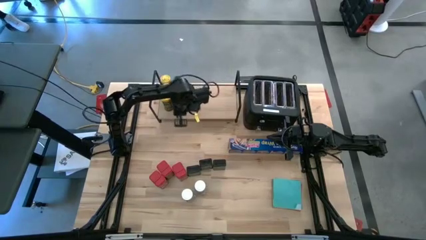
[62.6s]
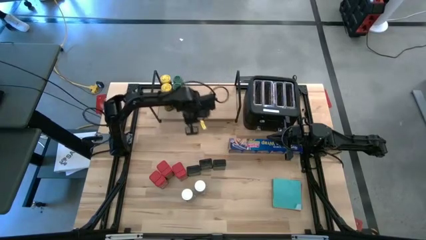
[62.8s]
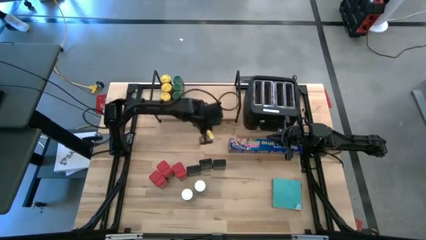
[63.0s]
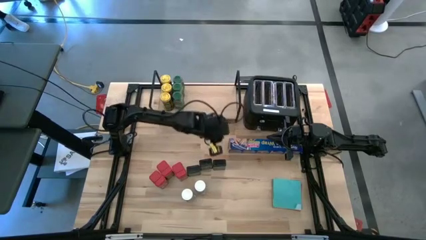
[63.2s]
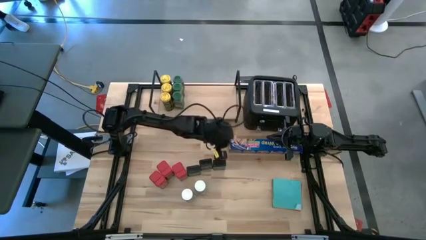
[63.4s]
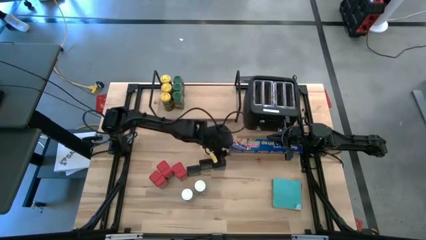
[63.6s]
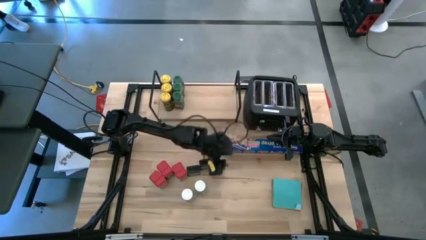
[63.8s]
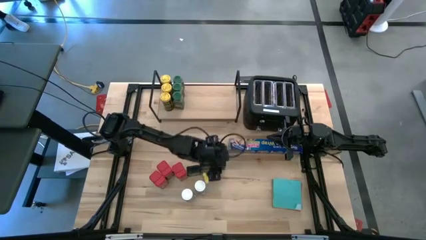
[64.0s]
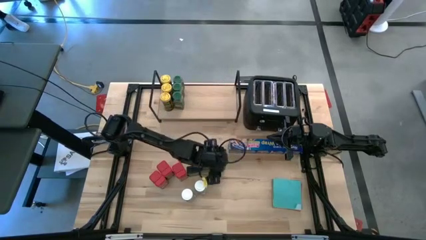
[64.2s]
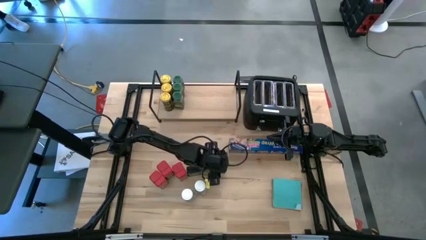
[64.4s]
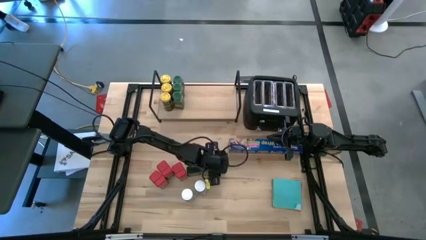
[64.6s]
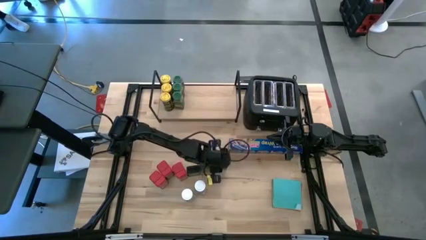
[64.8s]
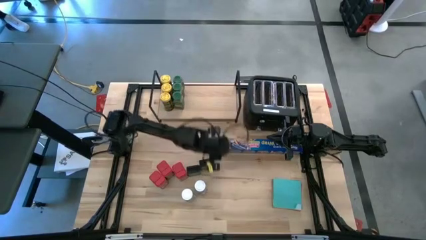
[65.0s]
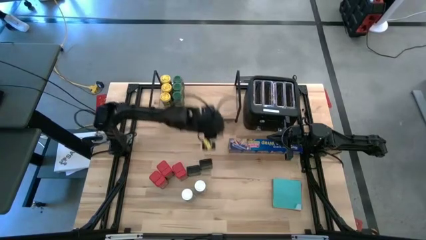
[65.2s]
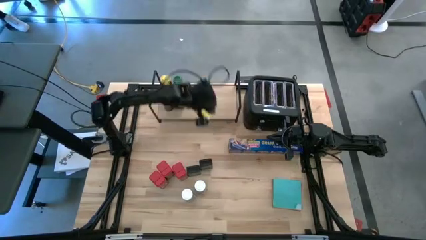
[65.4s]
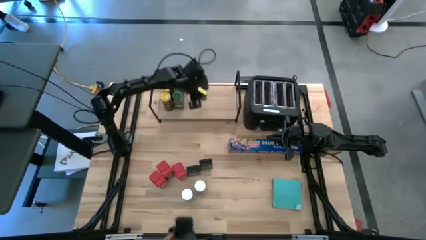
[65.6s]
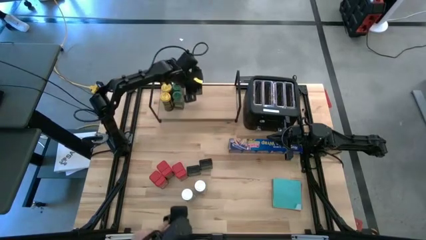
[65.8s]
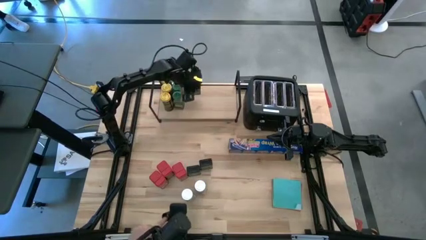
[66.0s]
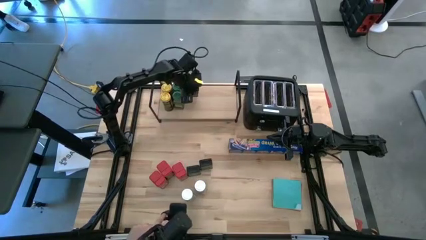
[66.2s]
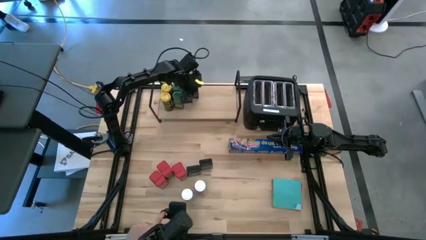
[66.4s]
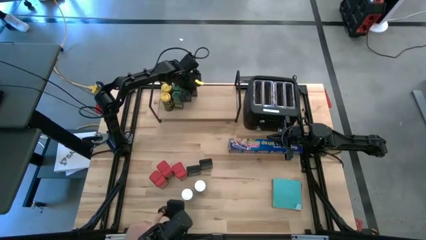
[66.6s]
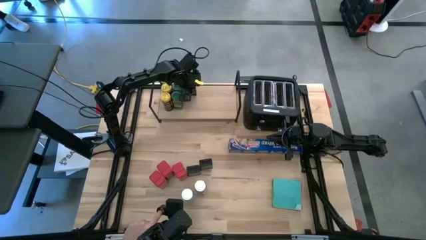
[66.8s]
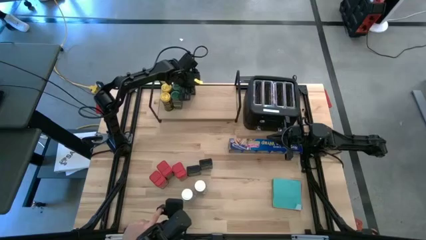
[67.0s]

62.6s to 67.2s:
Task: Shelf spices
Put the right green seasoning can on the shelf

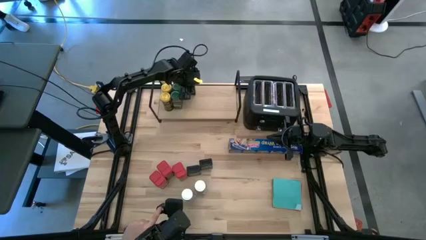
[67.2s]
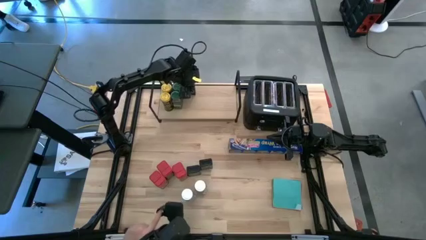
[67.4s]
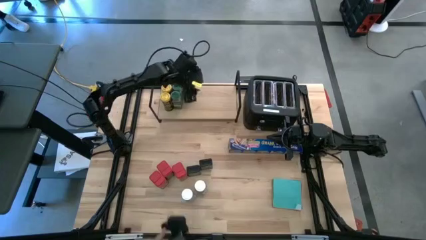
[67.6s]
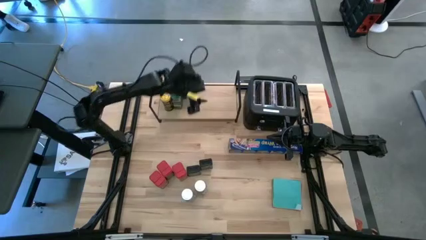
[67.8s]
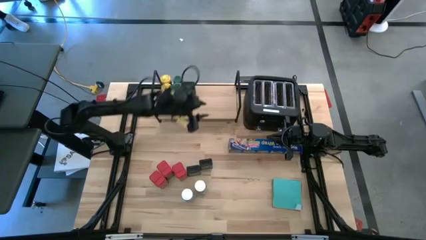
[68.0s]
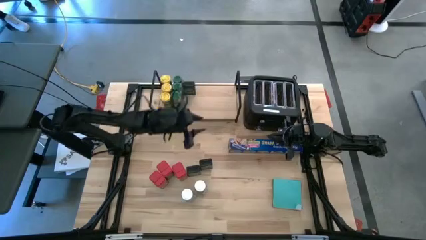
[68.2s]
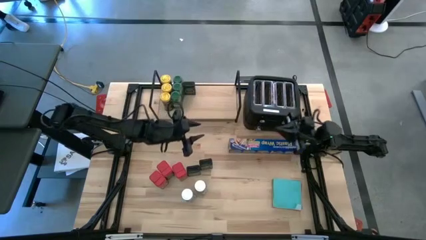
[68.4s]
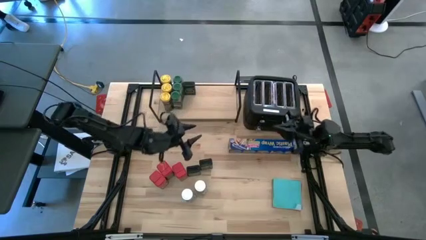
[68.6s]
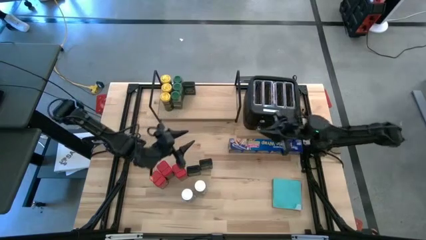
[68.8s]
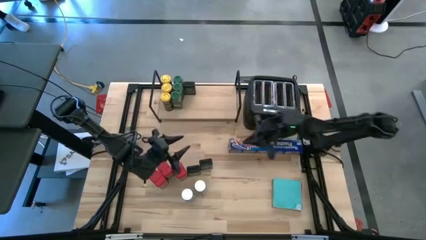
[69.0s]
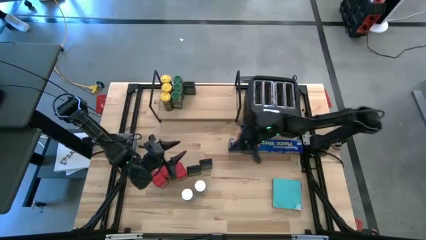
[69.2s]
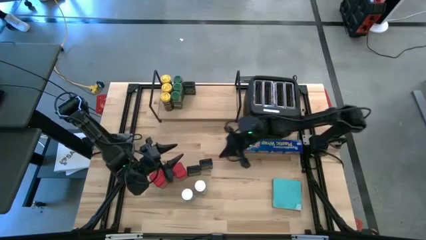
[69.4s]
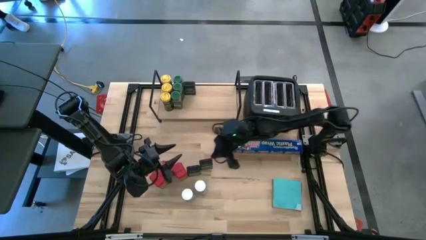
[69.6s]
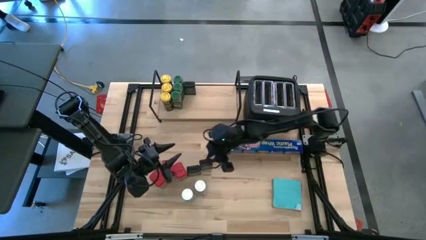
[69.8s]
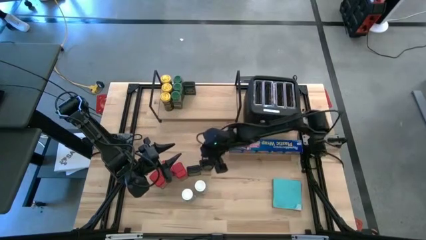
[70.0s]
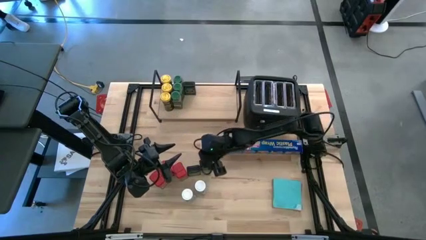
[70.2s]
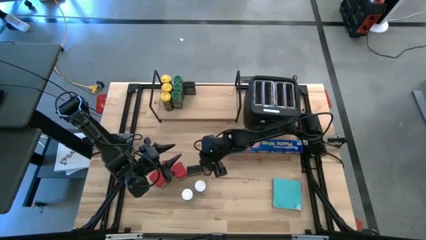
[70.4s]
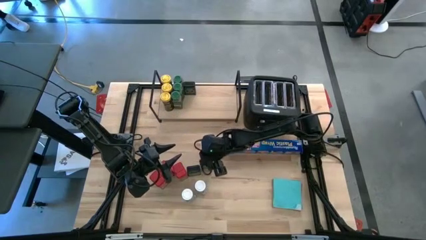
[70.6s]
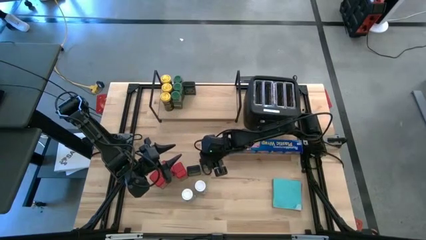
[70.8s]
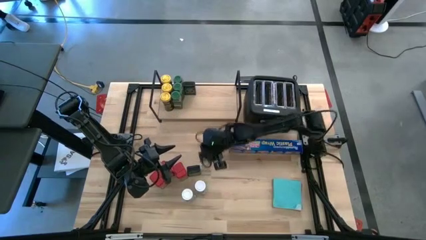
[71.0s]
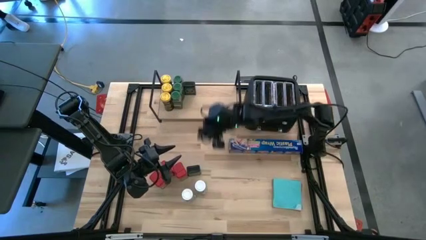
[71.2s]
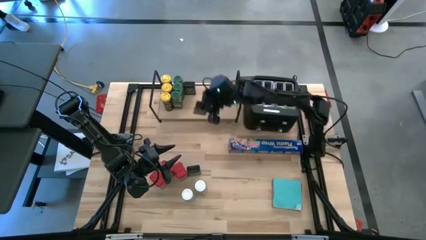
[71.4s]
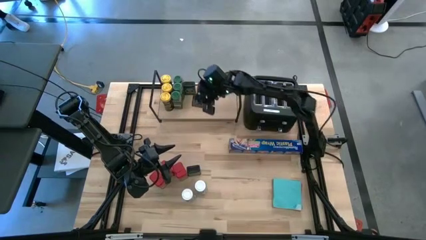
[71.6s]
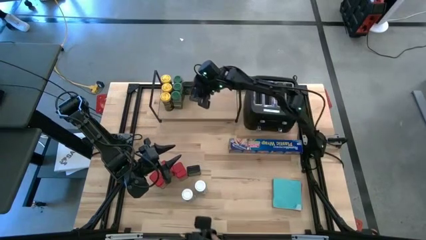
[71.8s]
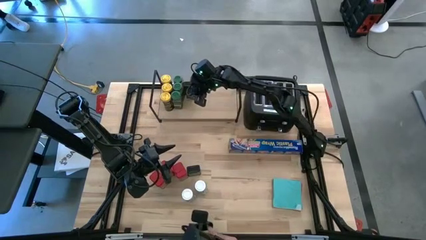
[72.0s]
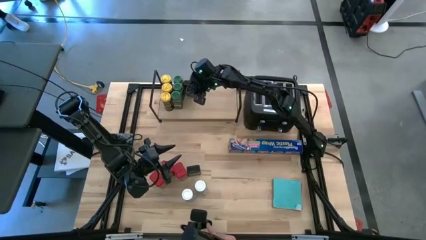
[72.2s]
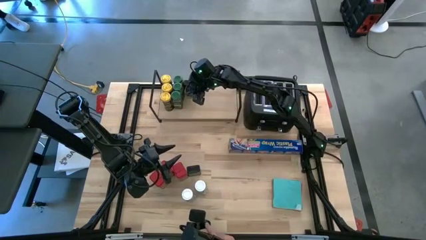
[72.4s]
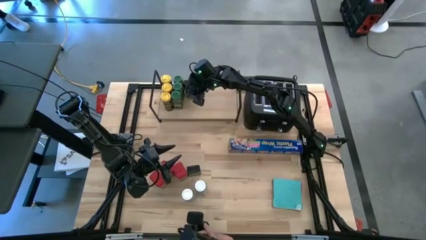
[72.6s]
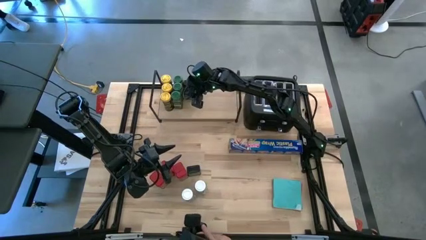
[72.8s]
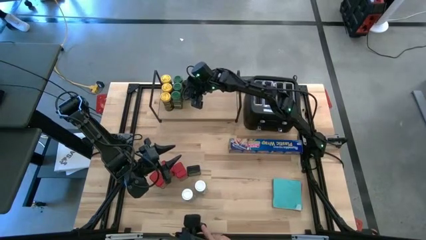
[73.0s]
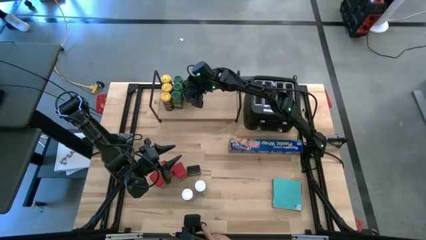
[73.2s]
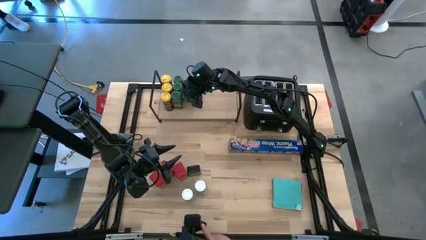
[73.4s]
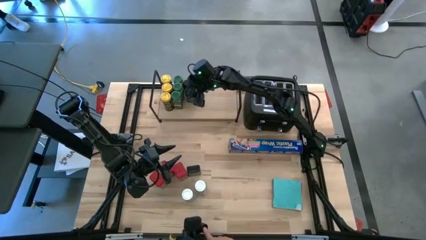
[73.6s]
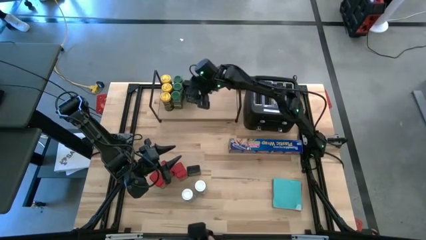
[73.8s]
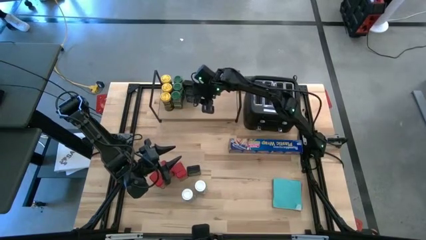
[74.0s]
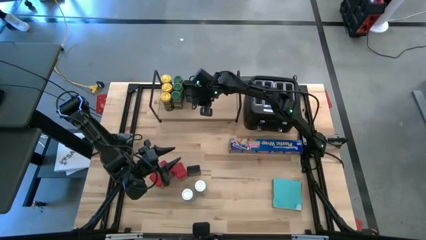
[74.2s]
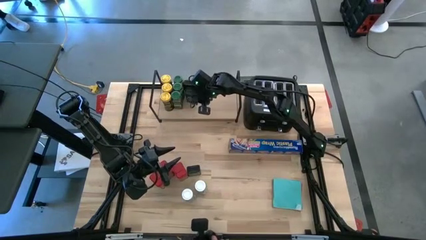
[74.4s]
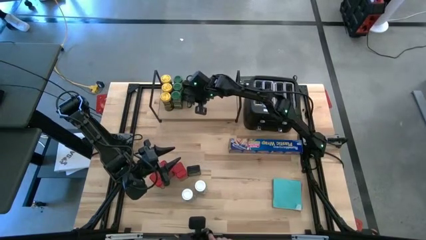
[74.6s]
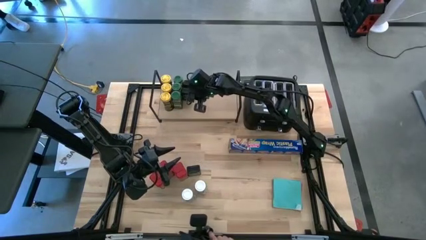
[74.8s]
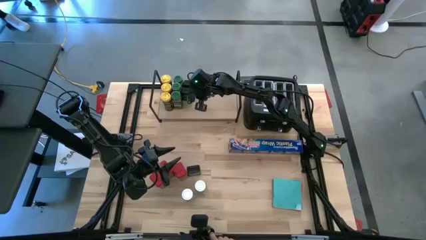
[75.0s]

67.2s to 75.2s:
Put the right green seasoning can on the shelf aligned with the other green seasoning can

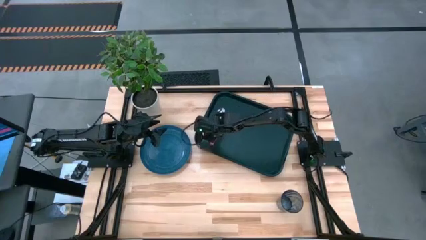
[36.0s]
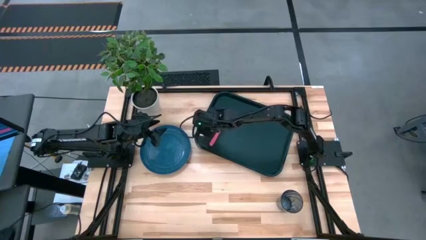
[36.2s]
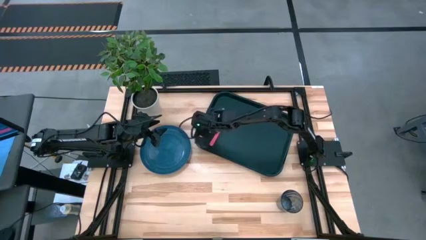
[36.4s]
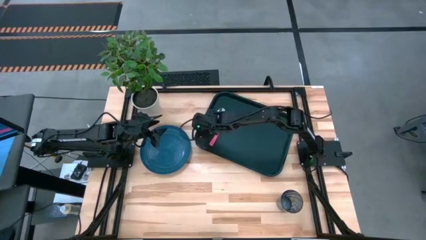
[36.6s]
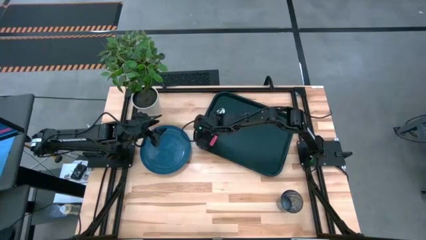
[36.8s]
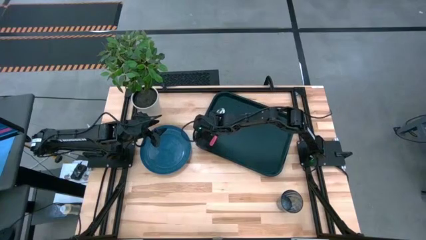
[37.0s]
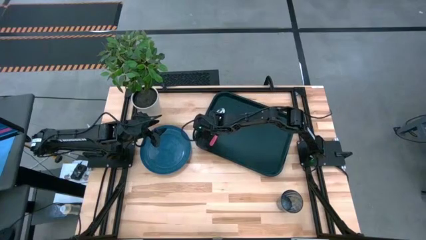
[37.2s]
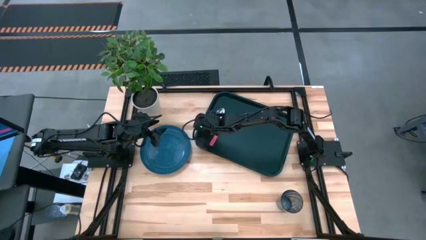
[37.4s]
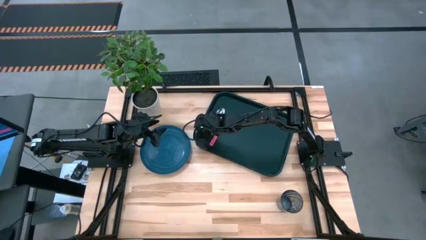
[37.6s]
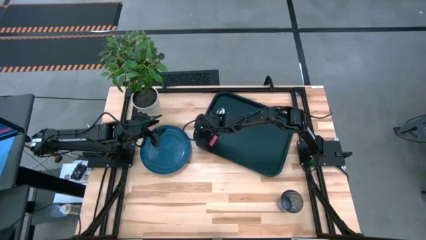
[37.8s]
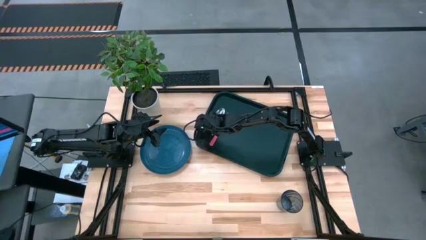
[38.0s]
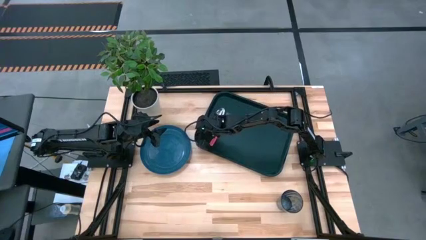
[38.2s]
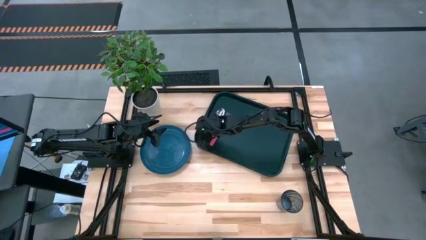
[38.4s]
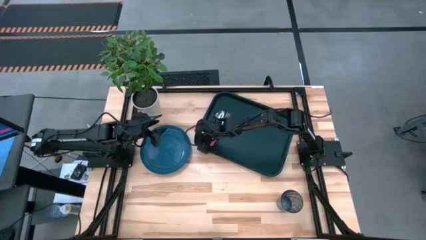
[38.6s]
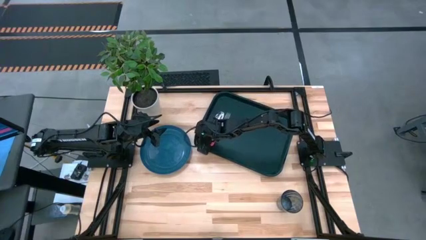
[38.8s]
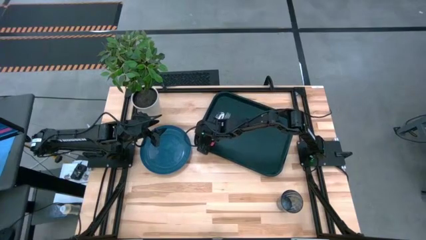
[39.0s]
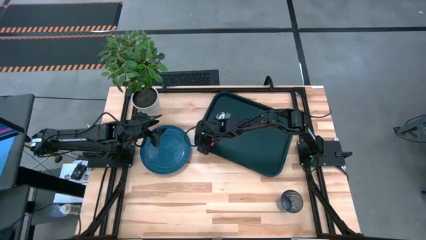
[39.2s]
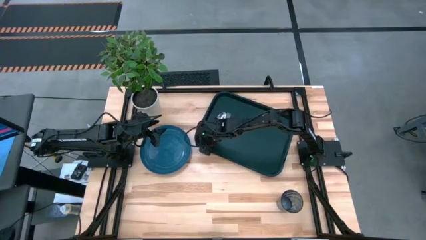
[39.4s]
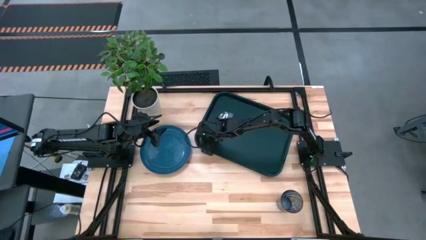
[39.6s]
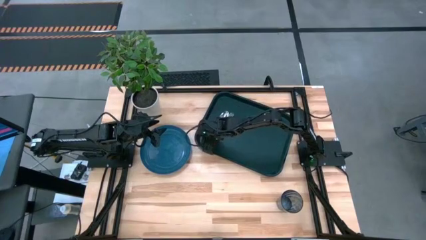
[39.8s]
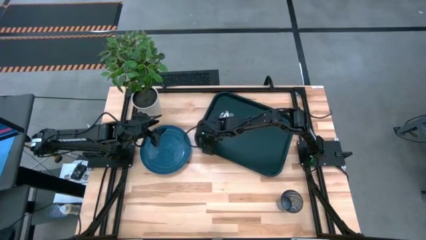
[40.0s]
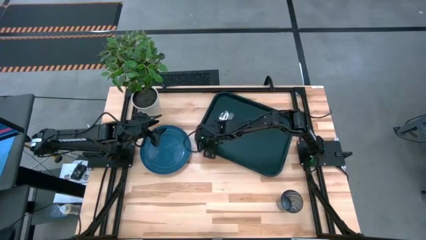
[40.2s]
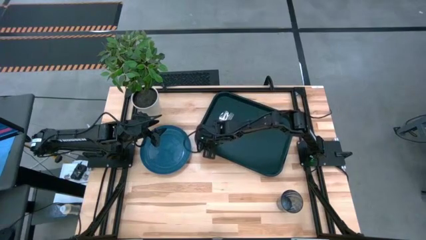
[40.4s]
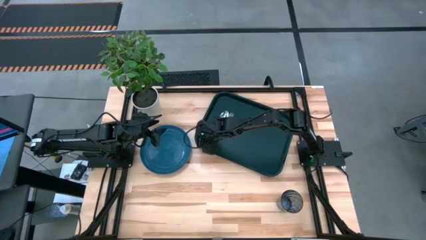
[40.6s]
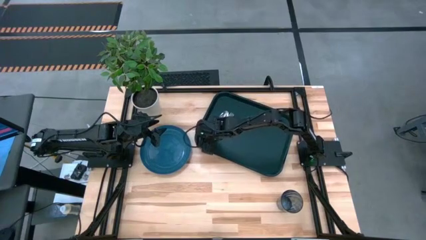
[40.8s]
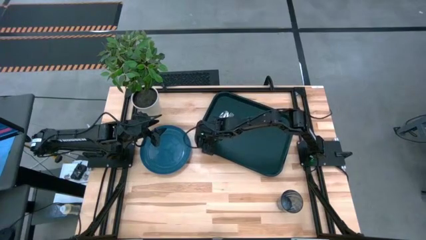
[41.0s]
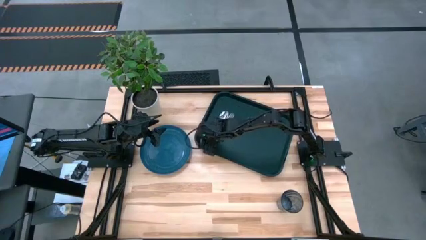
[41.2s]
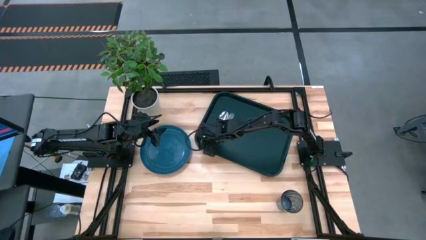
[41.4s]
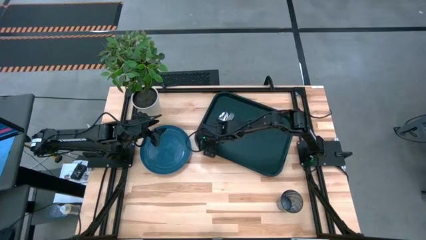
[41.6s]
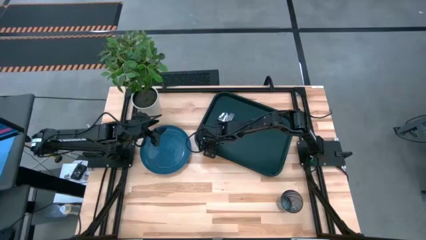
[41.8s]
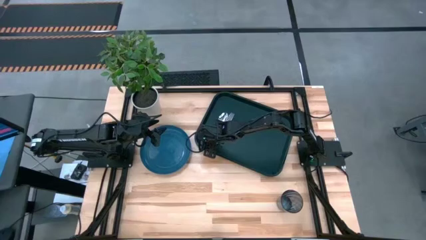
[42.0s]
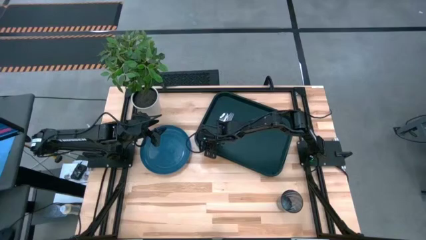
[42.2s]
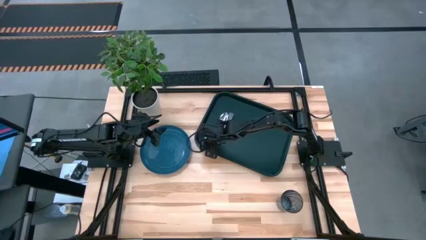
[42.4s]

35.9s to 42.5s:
Task: Pick and place plate/cup/fork/spoon on tray
Adjust the orange spoon on the black tray
